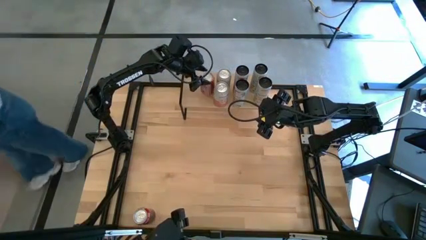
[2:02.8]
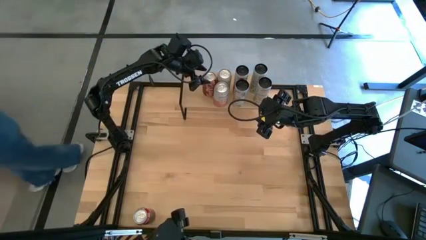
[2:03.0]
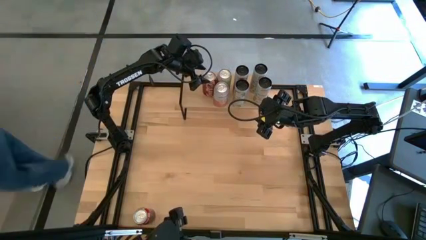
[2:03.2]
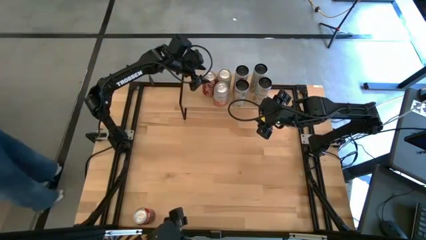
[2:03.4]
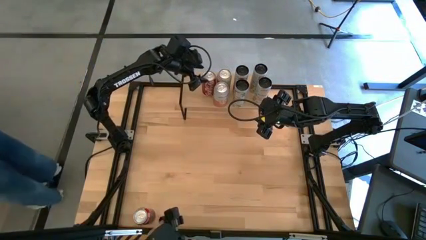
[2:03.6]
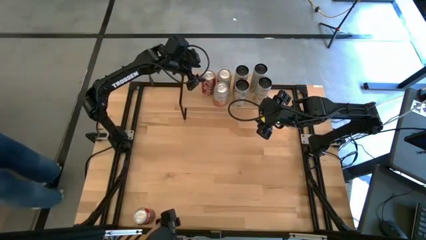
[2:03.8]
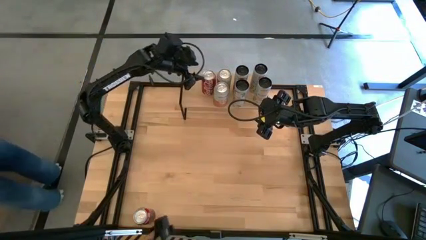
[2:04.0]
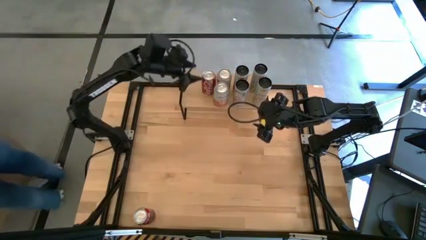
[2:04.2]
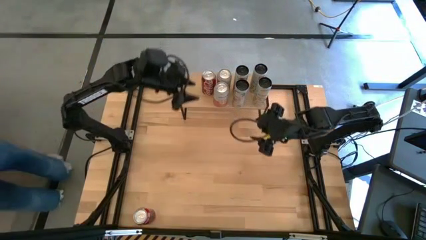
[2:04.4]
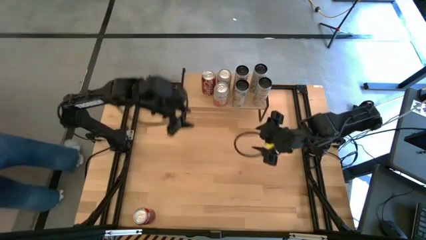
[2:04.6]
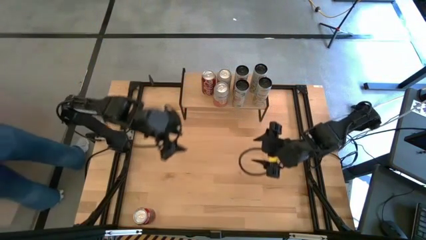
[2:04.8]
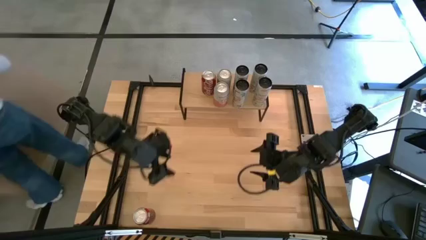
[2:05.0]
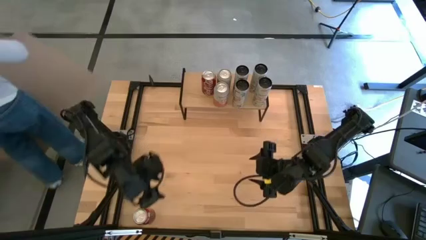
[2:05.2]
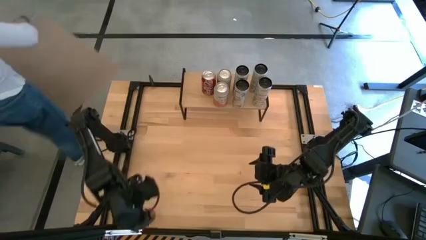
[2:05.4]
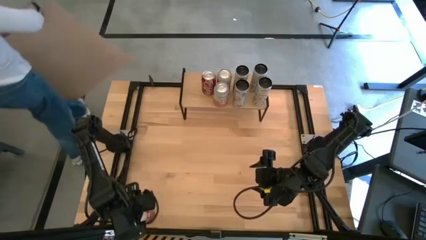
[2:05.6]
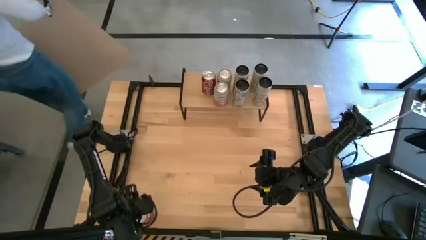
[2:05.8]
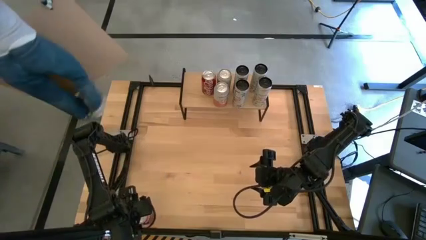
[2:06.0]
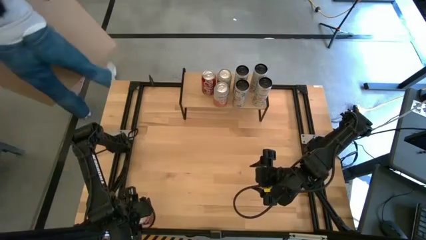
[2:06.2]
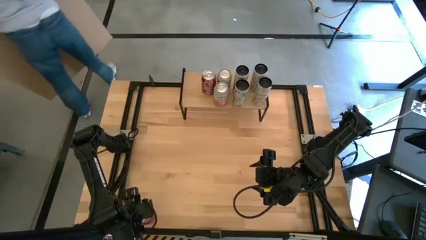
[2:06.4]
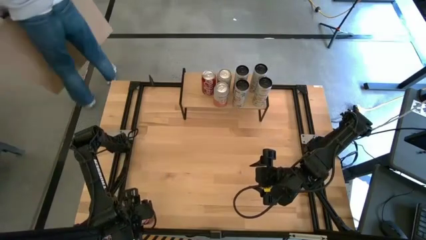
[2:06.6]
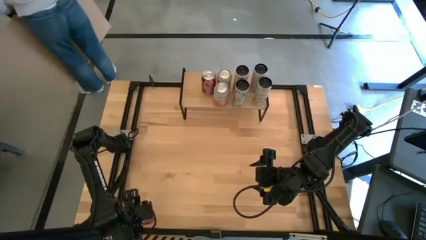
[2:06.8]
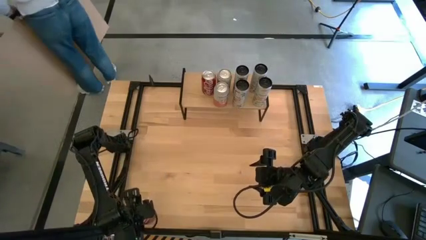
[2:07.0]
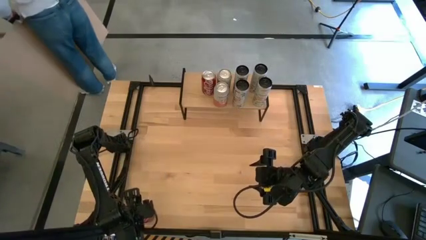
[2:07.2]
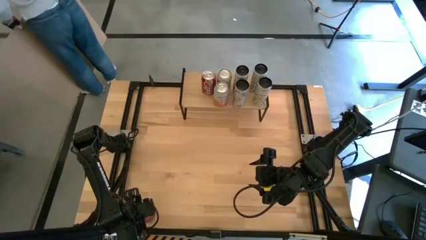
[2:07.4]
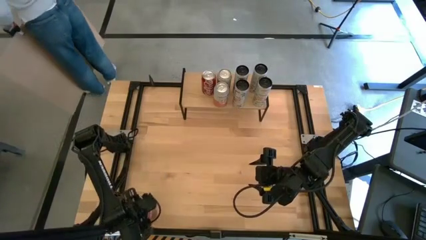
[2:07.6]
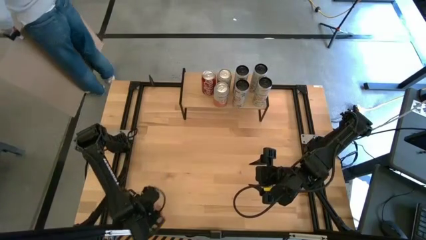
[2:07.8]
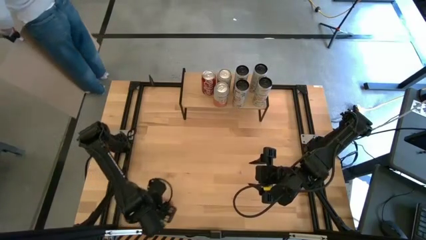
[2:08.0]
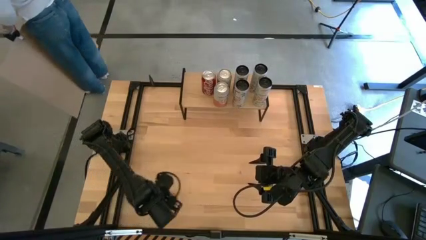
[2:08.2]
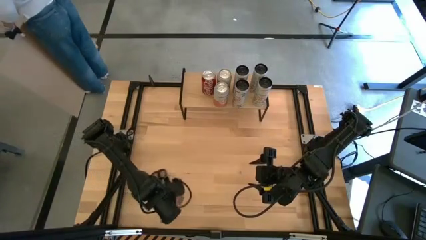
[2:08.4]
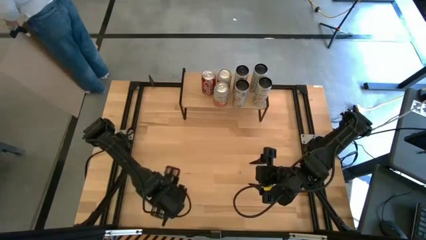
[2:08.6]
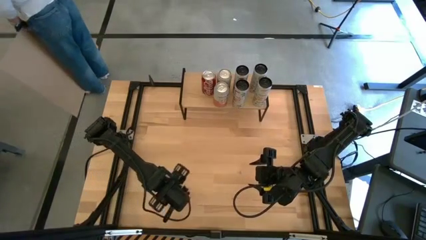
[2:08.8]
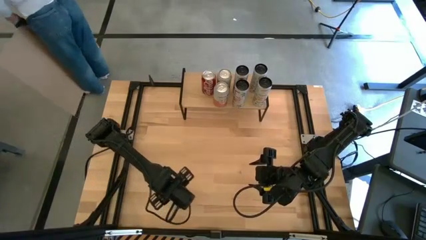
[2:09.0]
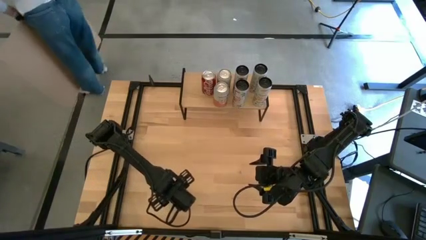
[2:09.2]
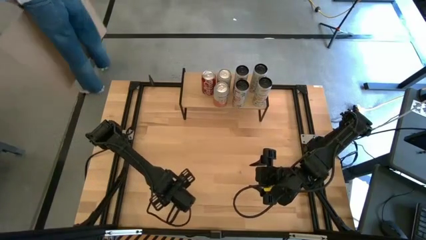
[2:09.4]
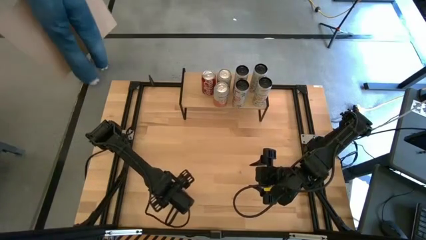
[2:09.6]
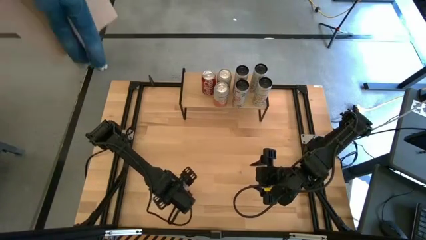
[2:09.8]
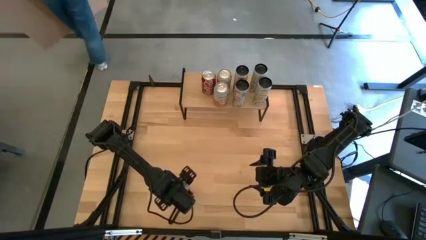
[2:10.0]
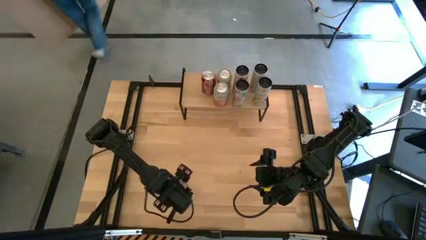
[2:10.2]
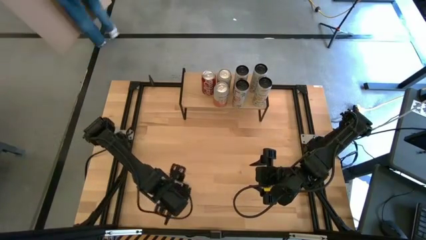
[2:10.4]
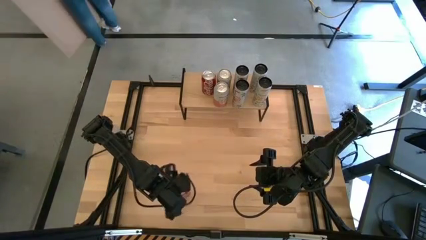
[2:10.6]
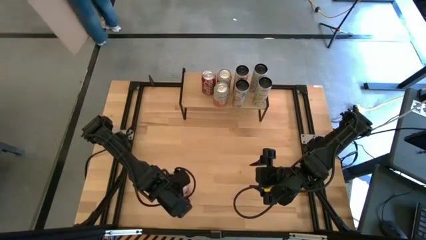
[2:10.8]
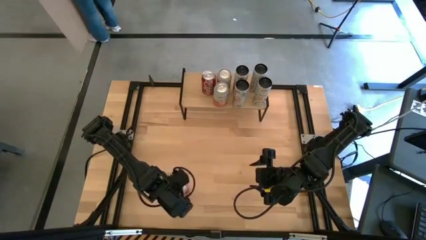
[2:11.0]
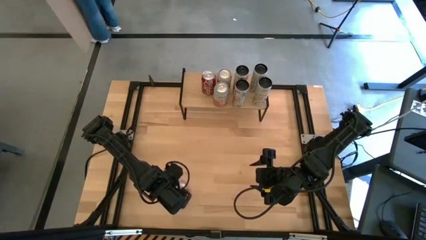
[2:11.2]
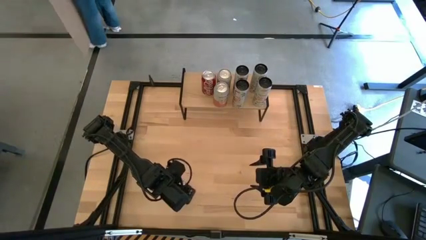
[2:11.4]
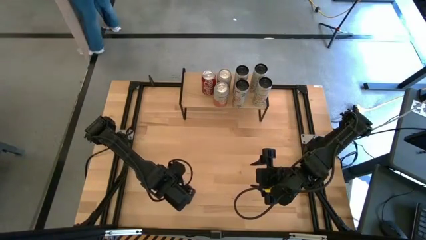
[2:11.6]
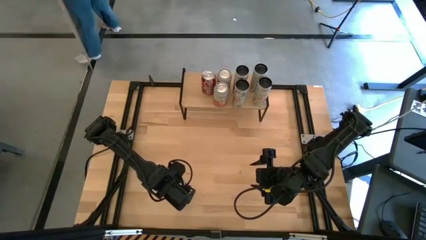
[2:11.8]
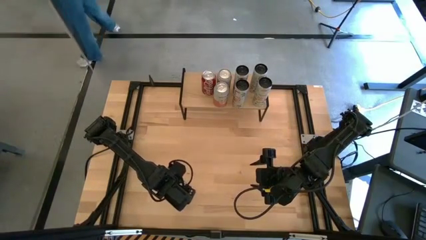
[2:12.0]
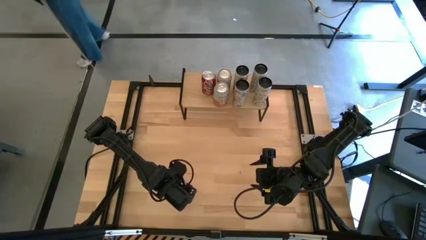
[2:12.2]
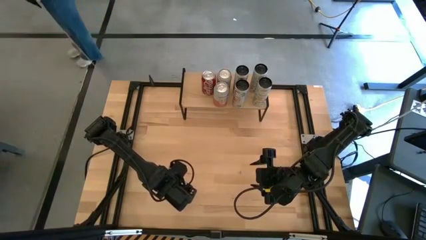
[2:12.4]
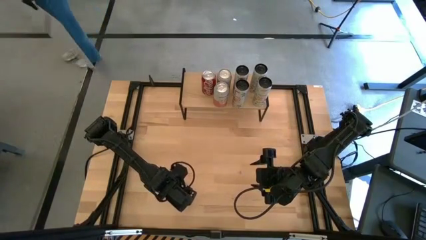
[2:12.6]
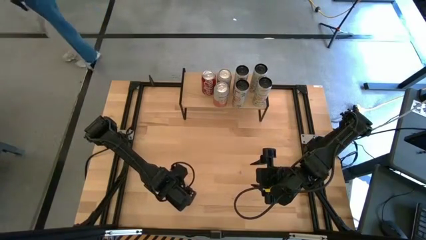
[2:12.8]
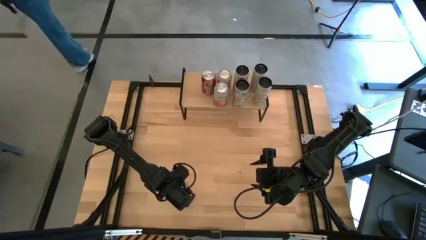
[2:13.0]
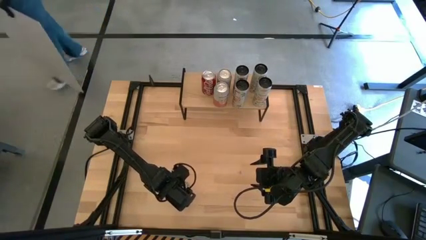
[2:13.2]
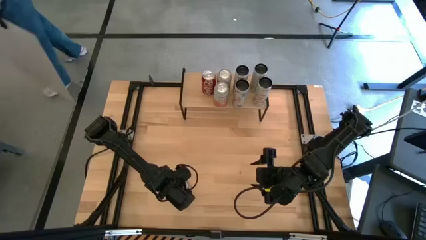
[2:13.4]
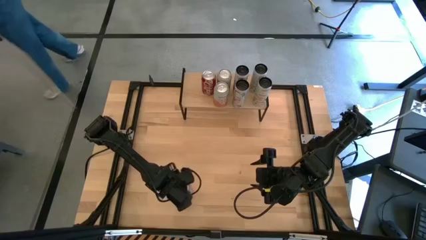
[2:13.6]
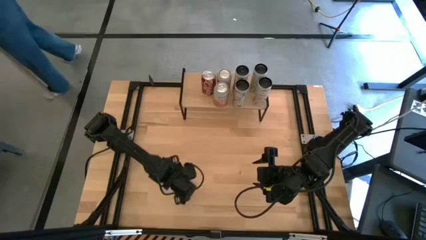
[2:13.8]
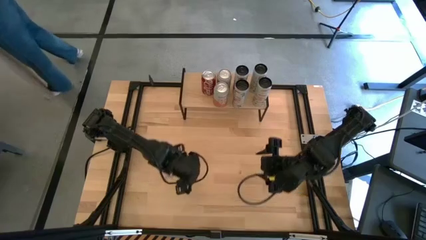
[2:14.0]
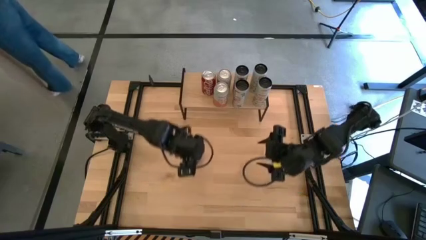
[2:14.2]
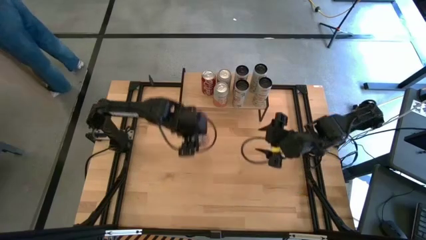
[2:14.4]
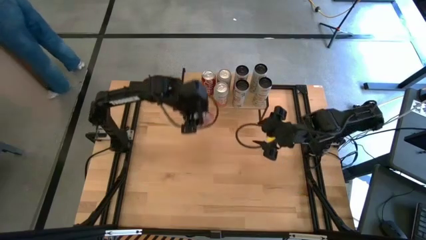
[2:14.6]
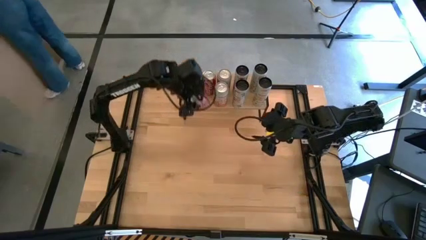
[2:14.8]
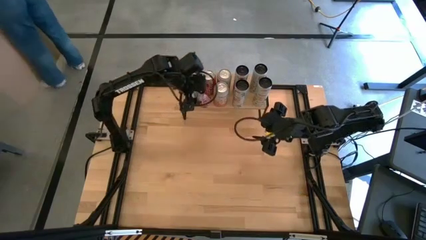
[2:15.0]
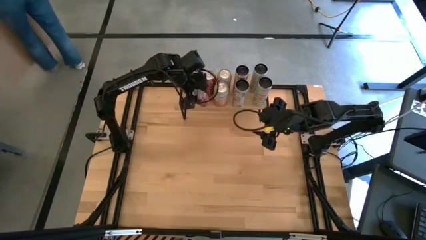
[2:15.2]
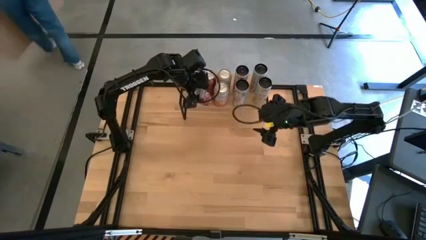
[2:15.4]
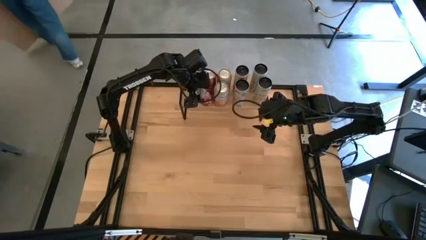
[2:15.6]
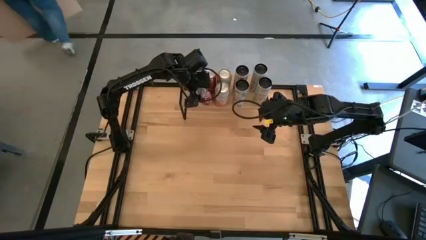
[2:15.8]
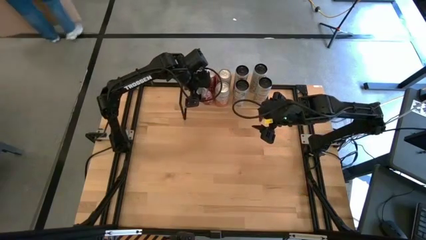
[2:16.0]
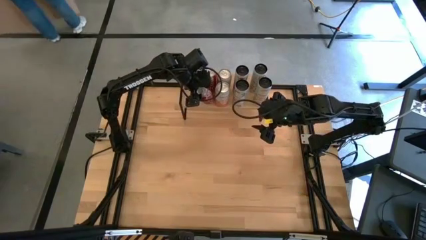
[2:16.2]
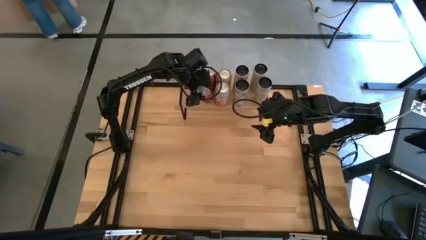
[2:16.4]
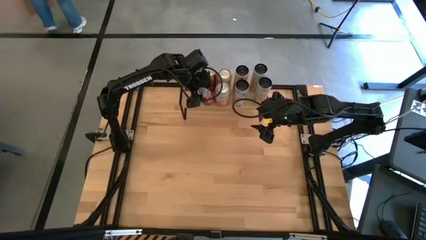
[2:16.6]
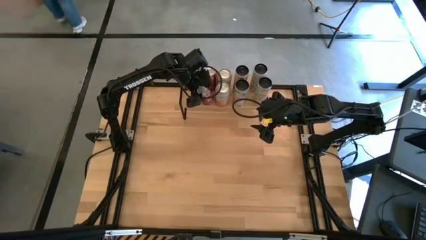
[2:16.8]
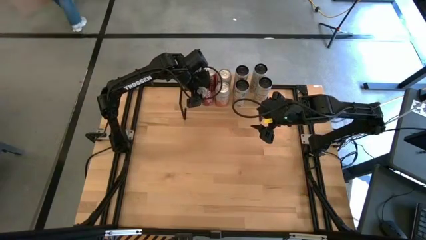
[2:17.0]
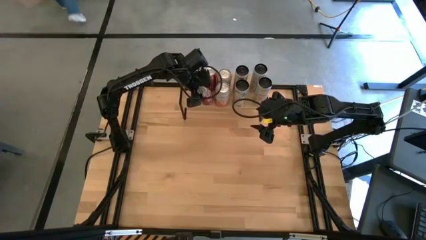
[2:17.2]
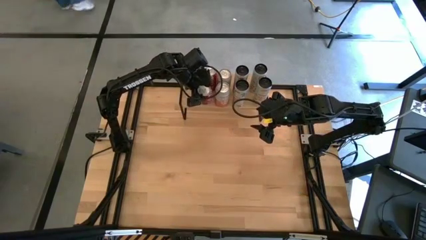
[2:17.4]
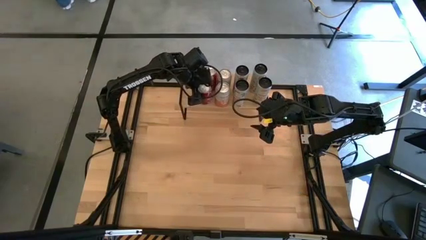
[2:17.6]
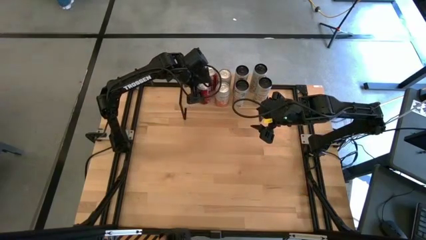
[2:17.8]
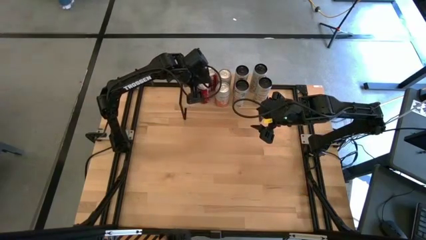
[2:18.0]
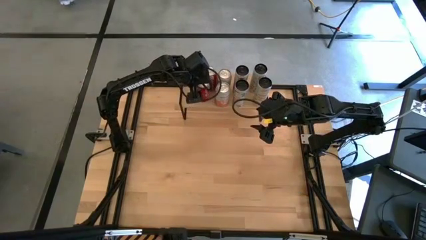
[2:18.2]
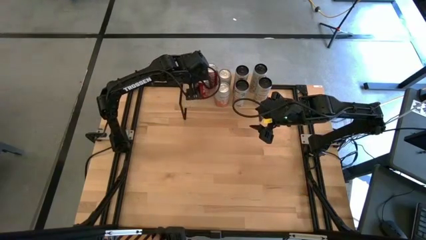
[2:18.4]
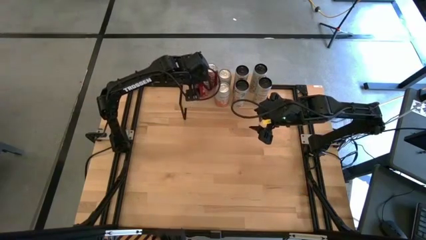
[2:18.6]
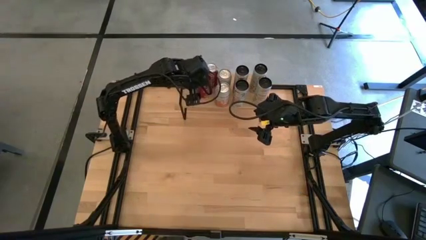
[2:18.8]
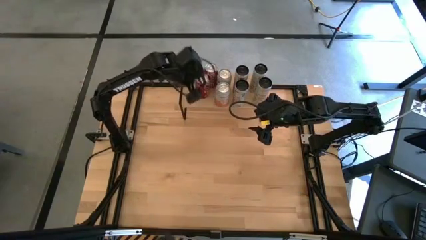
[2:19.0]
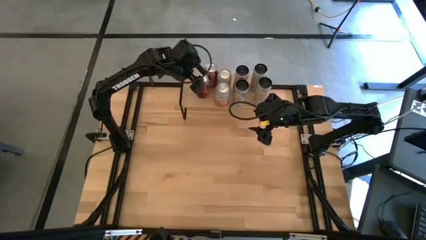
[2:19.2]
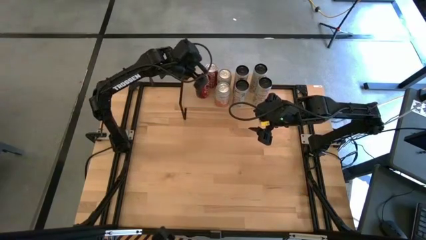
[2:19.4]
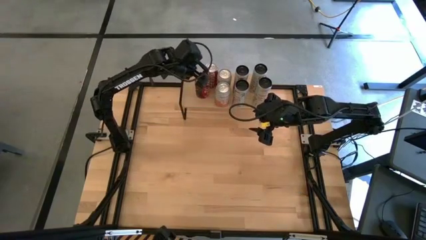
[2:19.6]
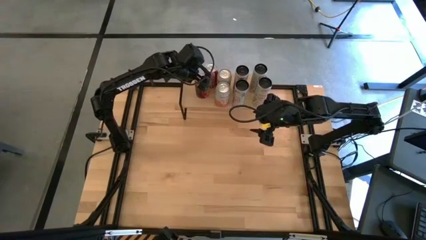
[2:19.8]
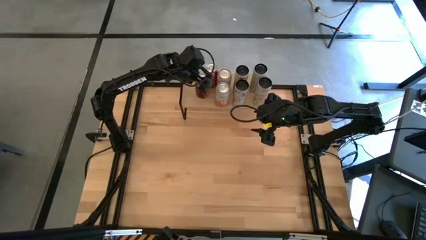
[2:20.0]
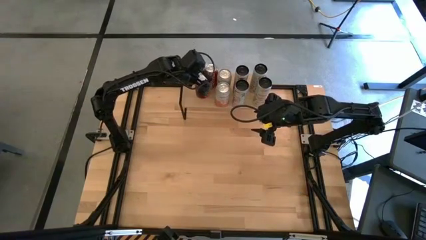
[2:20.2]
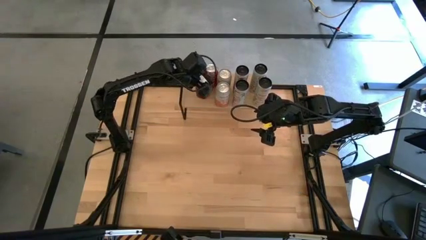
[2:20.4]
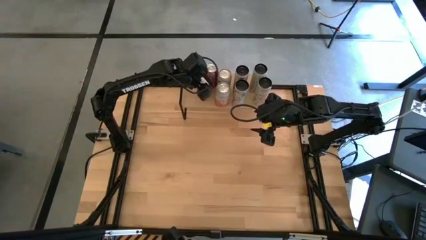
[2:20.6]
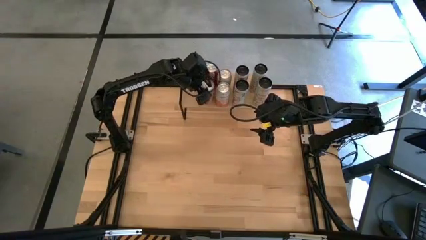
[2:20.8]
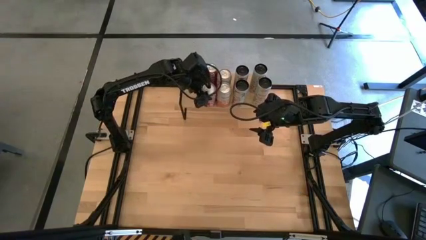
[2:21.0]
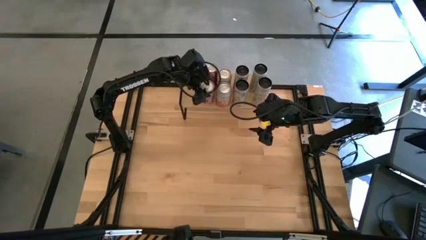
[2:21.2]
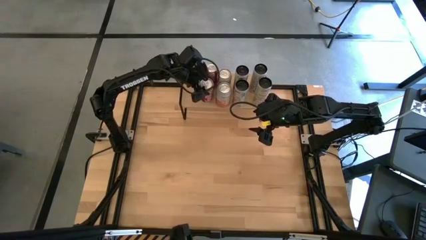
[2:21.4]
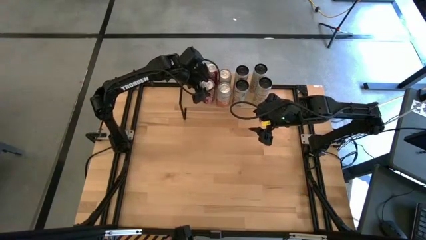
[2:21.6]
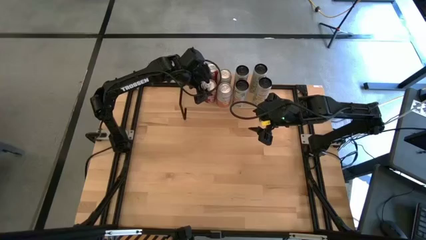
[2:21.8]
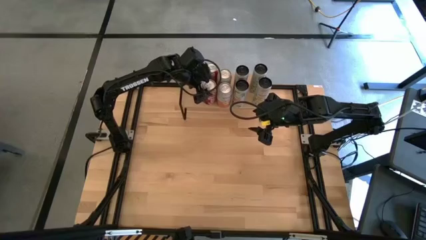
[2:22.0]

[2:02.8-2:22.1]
Task: Place canned beverage on shelf
Put the red soda can aligned with other red soda can on the shelf
